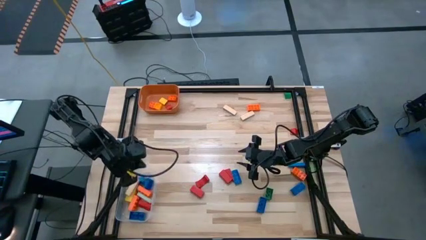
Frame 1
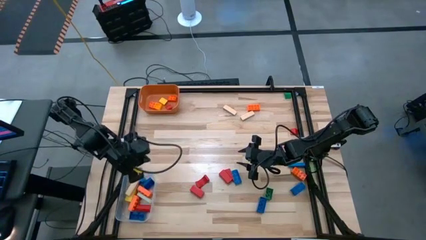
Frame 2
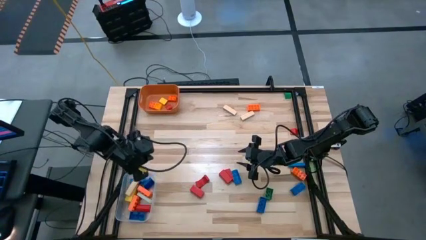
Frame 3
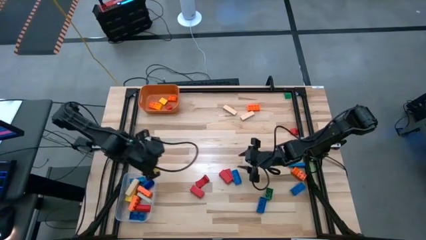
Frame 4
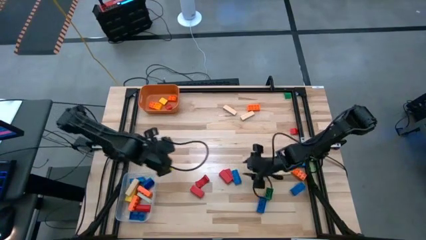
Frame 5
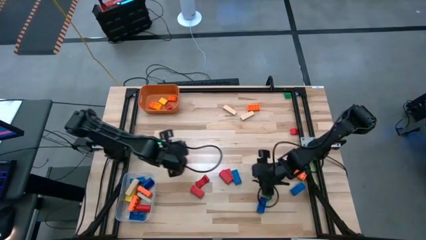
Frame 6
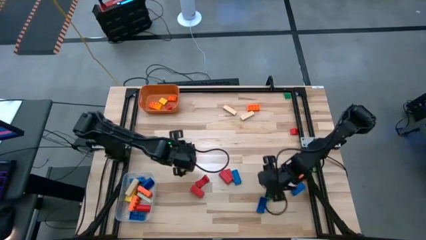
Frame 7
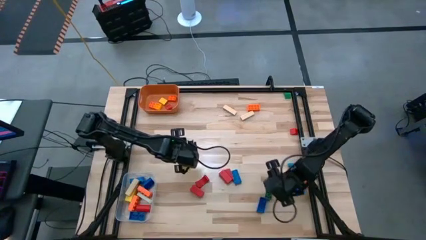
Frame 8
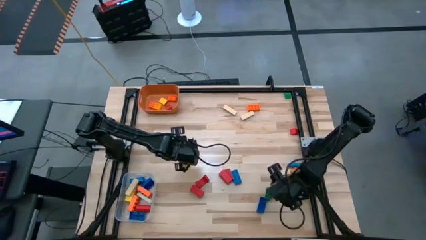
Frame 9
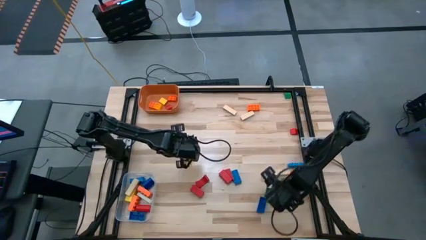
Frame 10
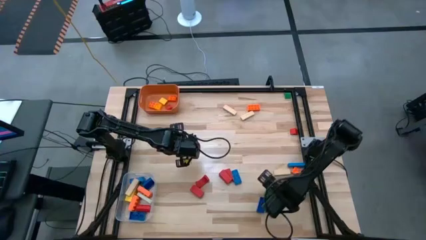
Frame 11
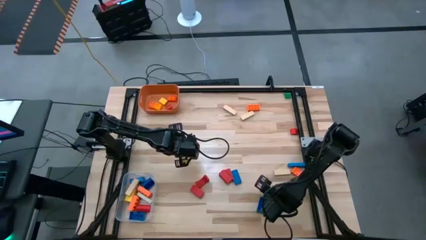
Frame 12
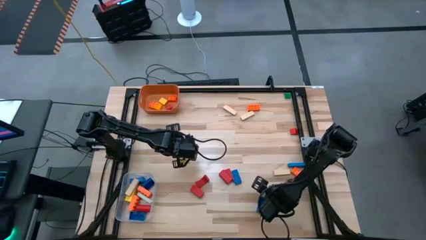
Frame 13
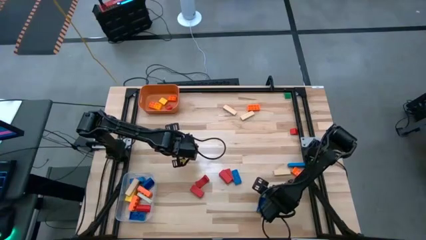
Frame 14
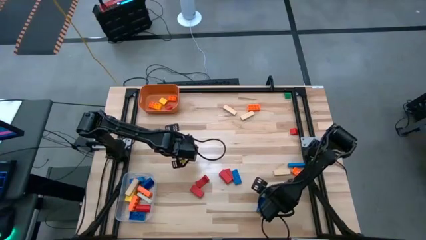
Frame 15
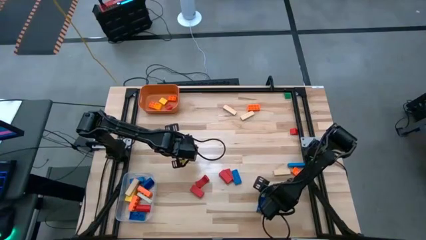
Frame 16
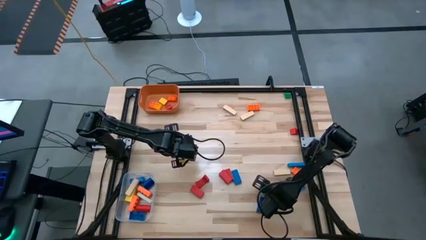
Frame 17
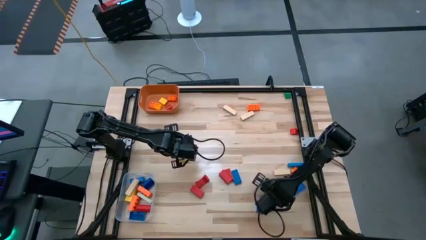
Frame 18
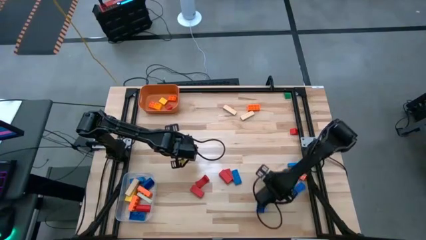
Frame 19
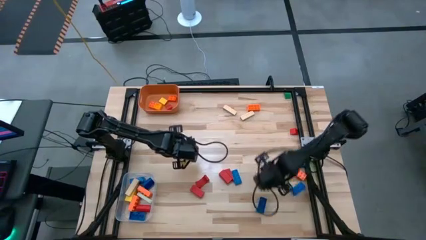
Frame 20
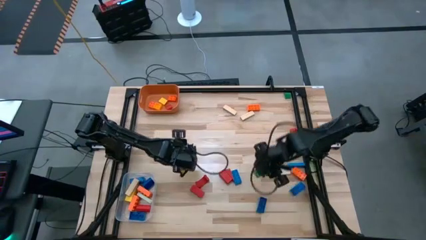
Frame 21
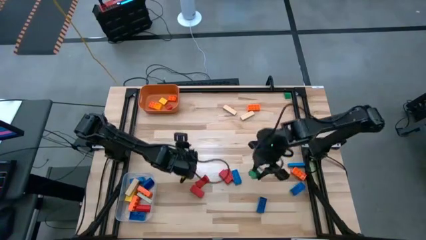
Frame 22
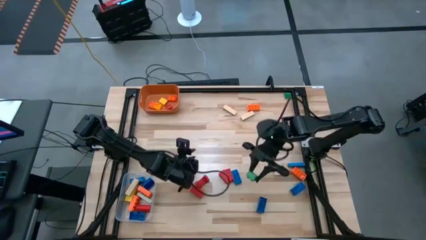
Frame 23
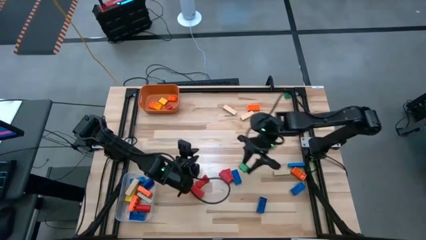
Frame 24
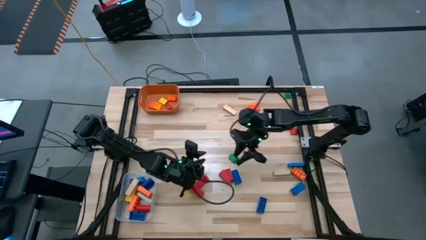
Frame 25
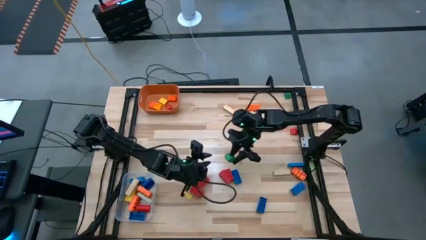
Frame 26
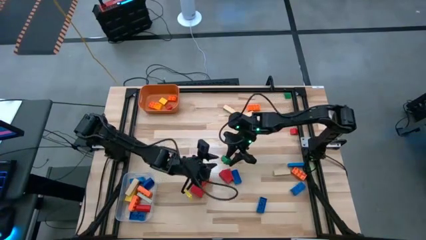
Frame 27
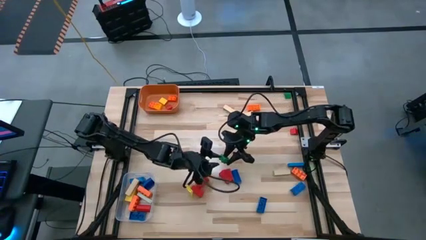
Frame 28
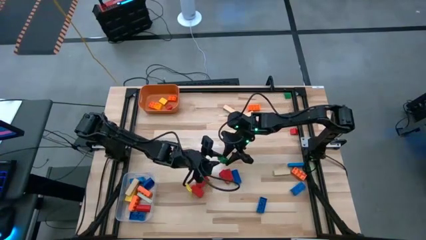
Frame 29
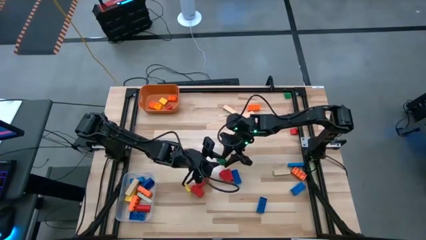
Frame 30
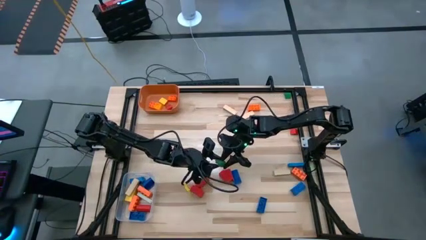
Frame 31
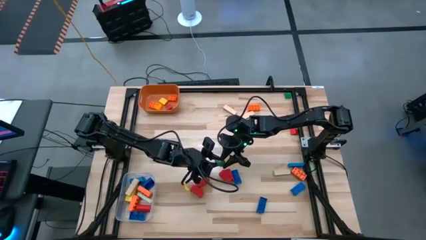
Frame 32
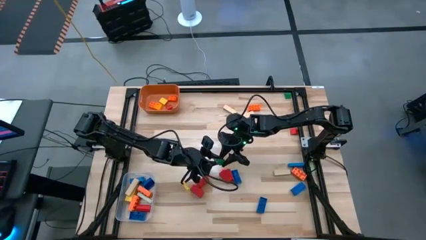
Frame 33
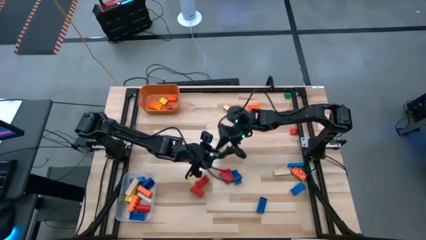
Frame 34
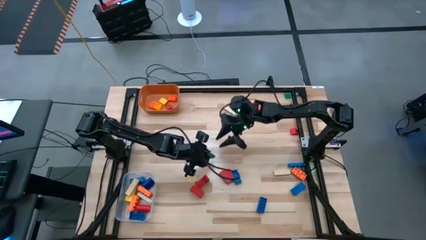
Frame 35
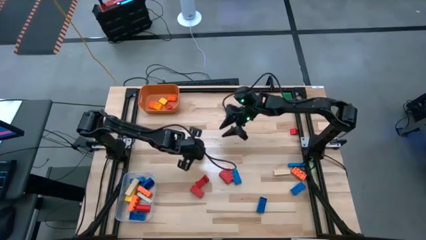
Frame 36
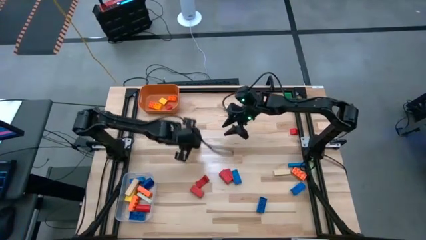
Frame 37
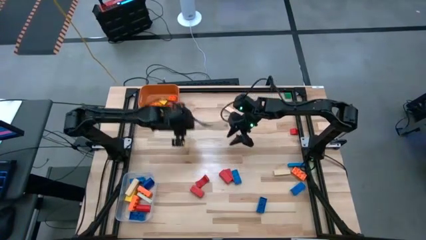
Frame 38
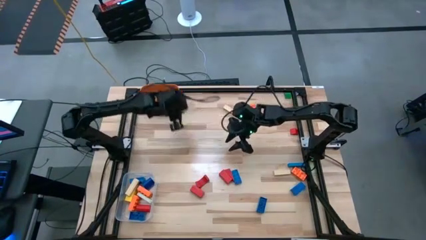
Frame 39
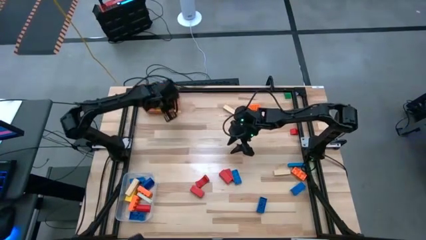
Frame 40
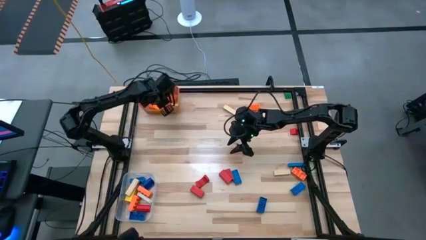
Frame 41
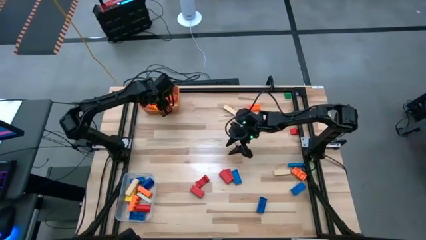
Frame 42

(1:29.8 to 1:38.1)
Task: Sort blocks by size
Put the small green game piece into the orange bin

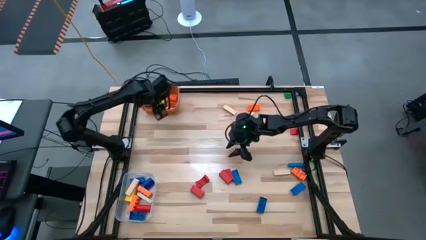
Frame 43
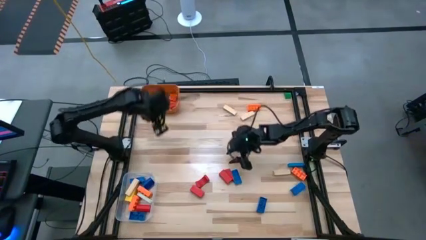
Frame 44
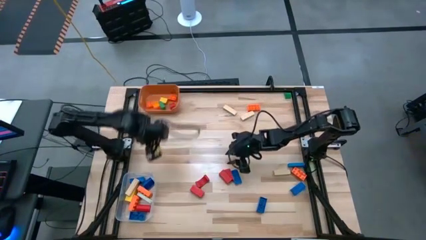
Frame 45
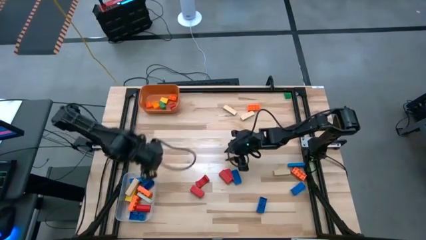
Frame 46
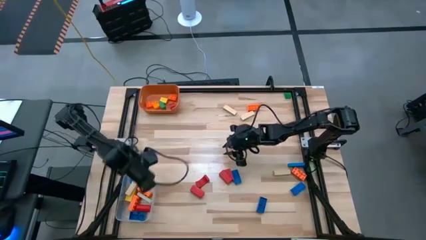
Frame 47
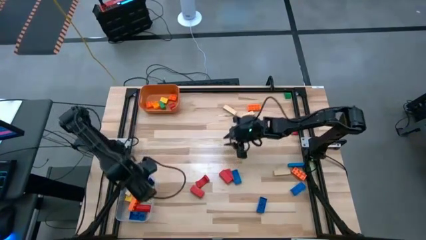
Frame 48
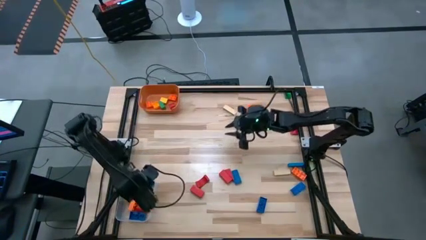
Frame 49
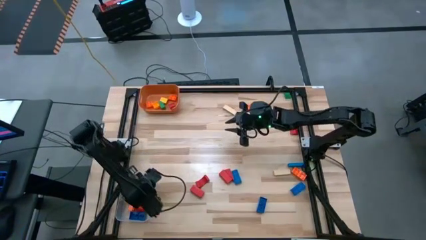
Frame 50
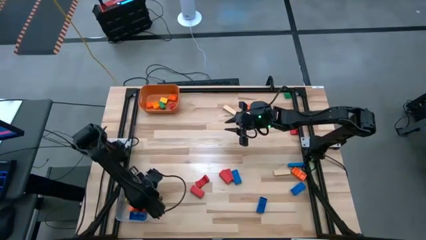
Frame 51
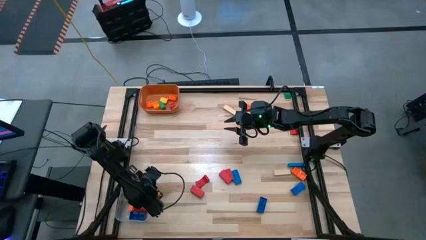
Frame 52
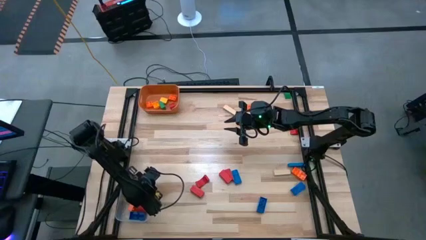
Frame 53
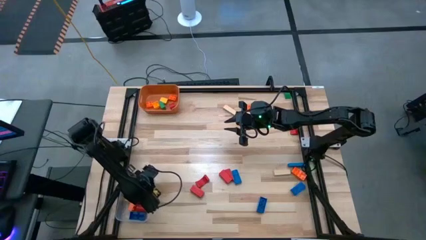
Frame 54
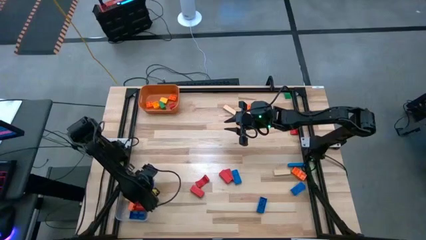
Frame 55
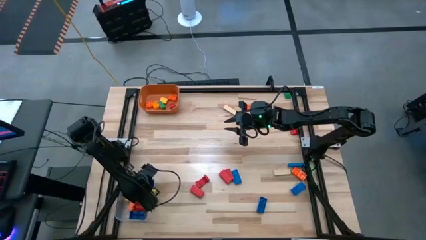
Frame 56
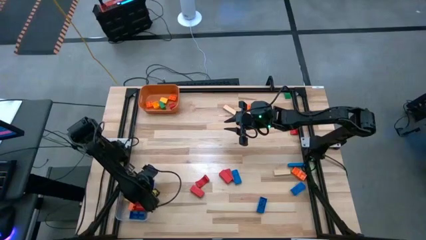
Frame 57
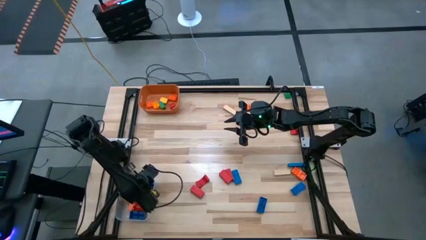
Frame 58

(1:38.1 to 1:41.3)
Put the small blue game piece into the orange bin

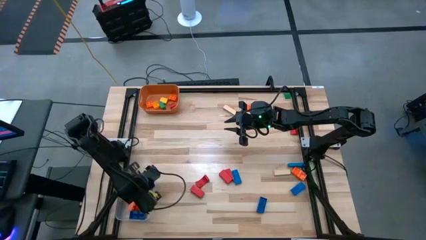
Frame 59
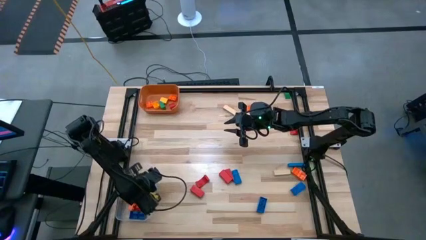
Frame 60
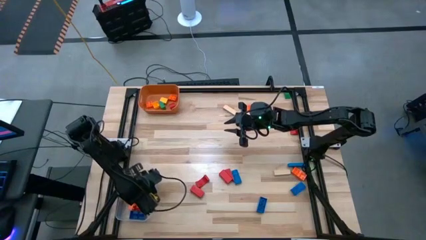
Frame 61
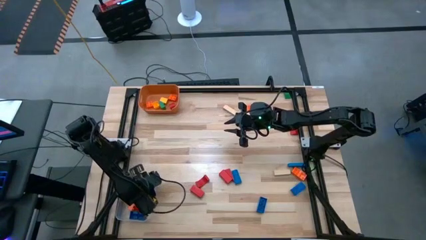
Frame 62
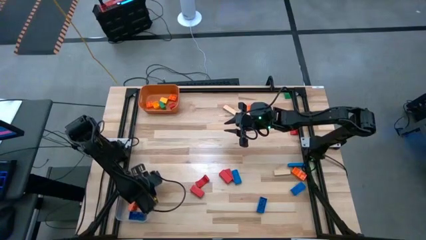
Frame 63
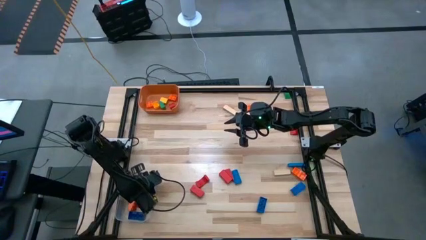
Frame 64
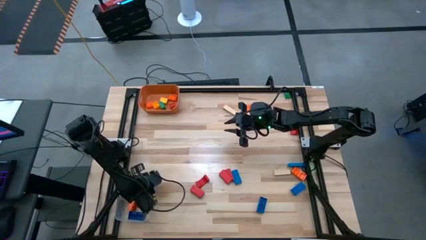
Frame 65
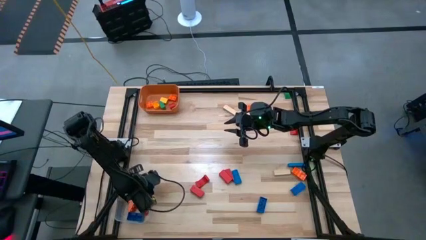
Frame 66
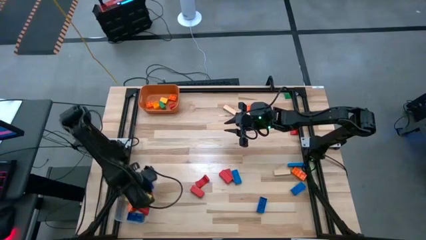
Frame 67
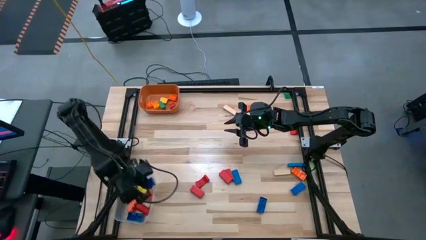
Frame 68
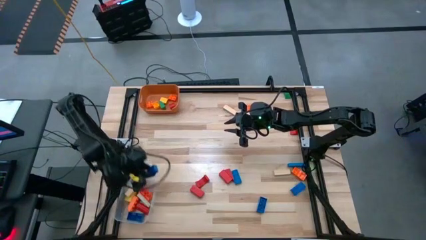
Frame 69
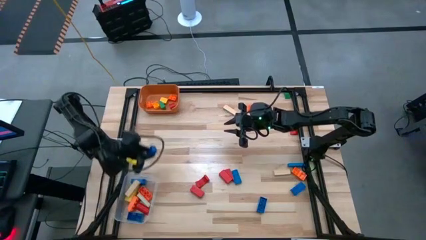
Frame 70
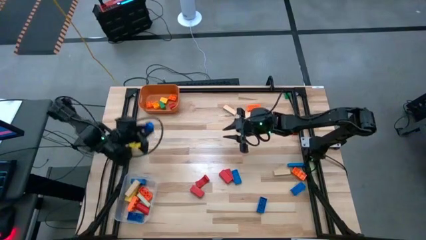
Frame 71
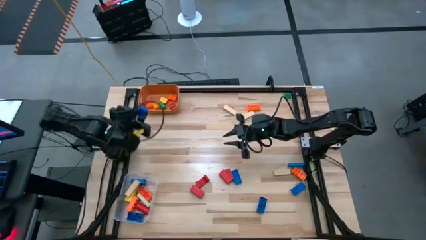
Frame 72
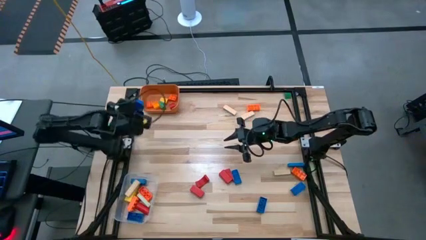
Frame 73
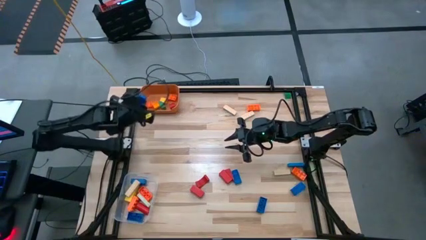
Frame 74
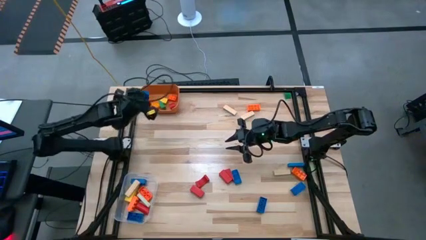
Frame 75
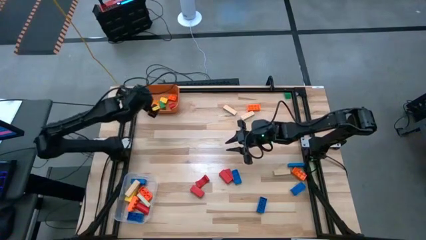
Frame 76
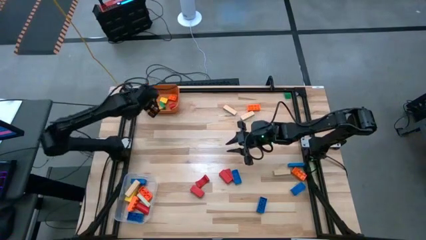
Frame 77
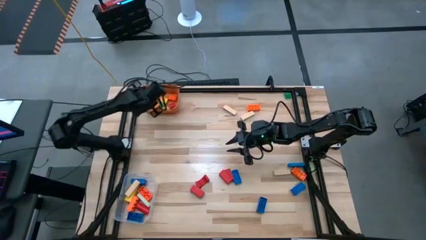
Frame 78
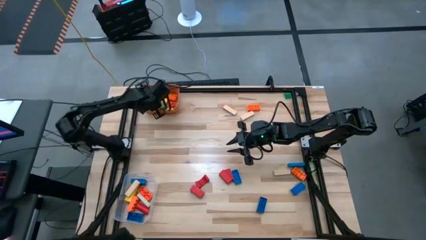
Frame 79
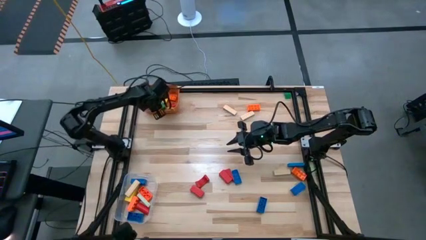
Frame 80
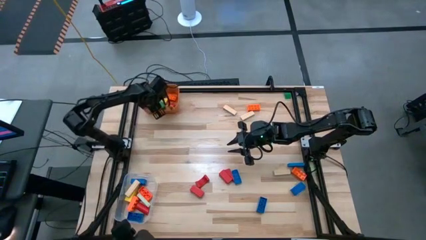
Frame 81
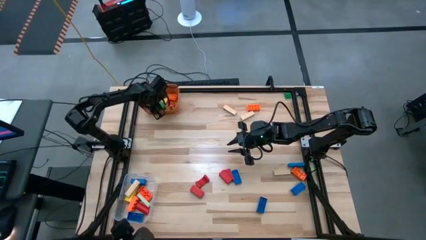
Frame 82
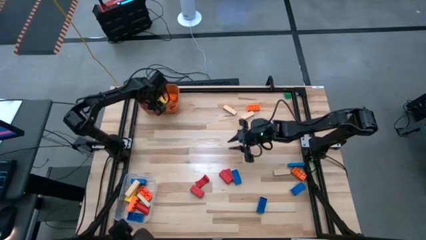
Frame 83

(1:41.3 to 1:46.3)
Put the small blue game piece into the orange bin
